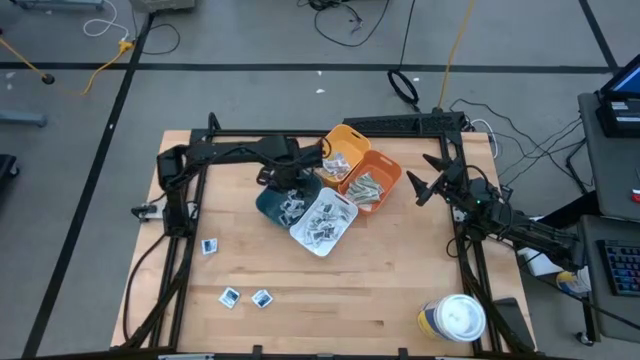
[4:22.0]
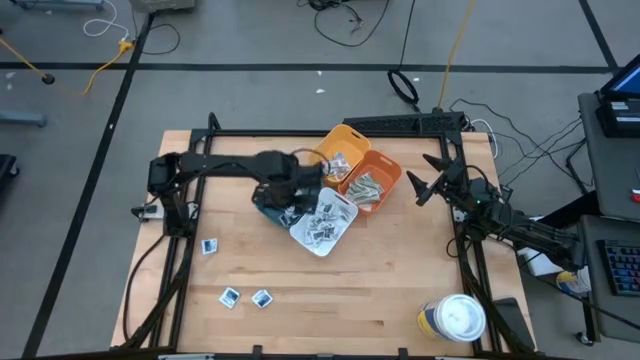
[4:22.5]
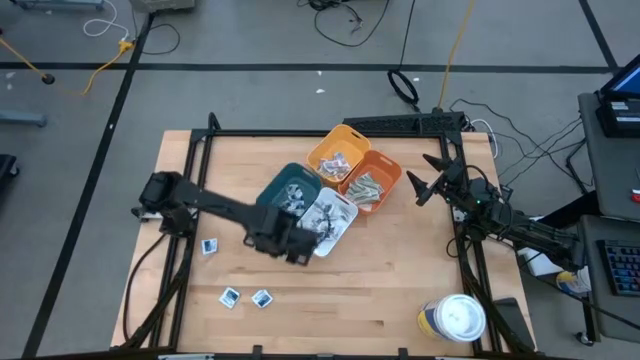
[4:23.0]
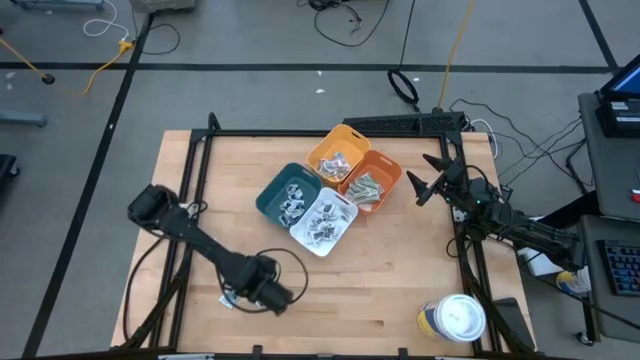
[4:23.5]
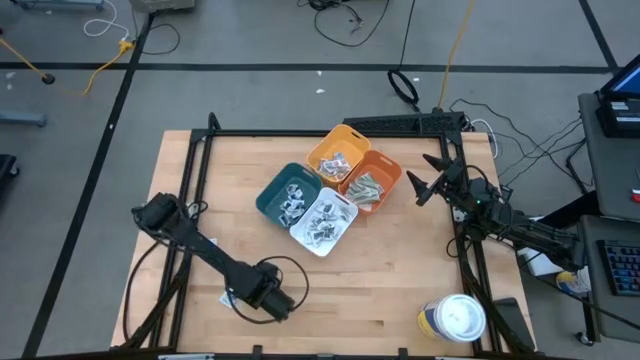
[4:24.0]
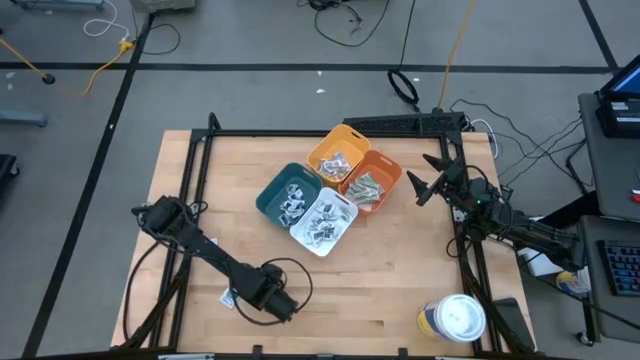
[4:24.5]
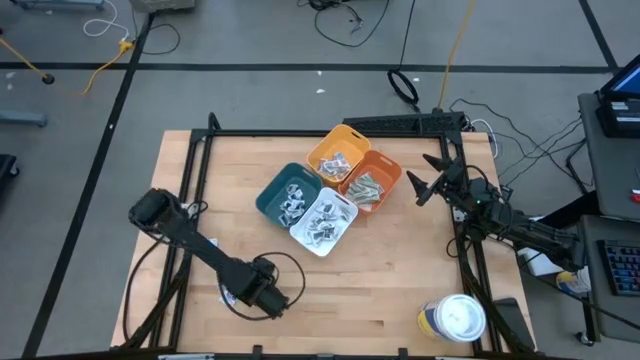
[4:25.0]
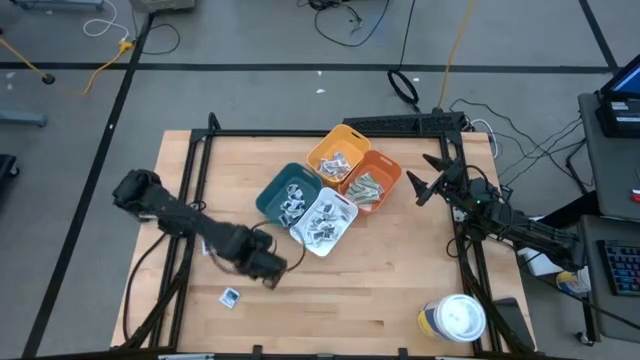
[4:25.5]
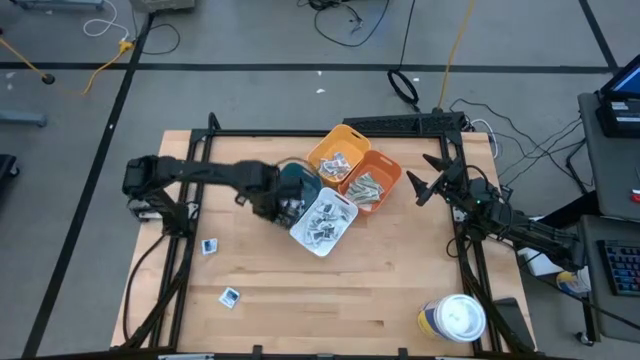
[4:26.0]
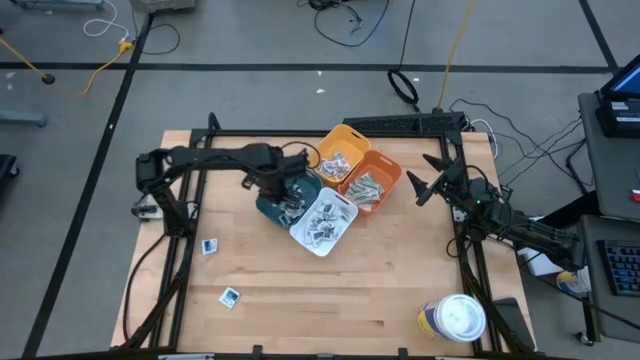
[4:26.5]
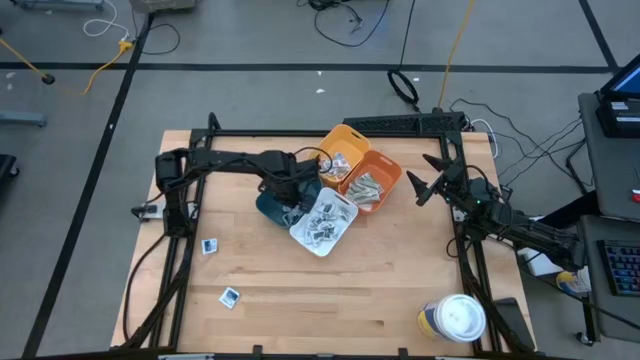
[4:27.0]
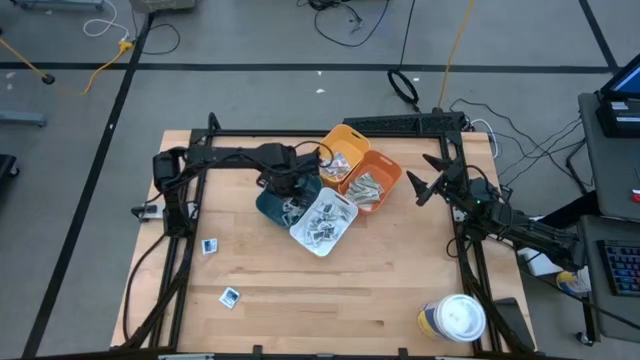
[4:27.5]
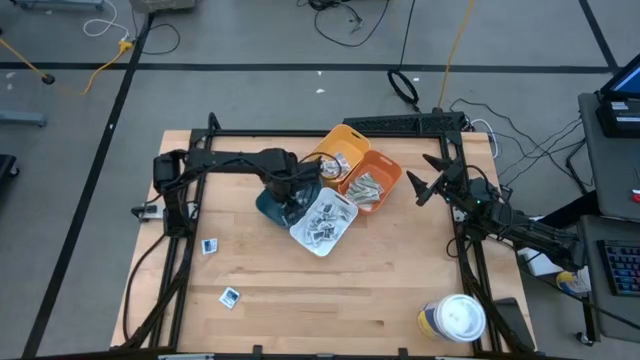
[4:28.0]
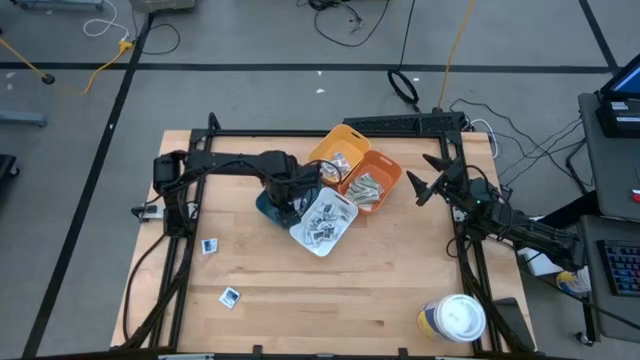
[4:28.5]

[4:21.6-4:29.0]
Task: Pick & Place First Aid Supplies
Put the blue alcohol pad into the blue bin

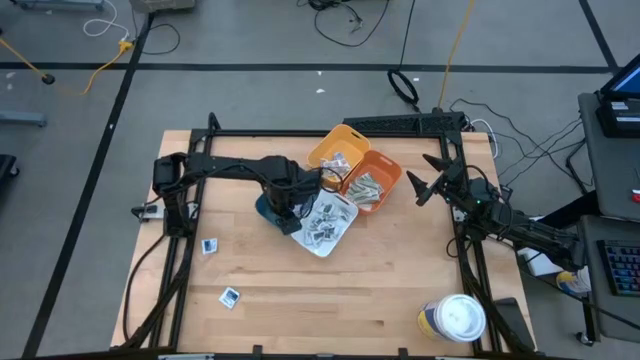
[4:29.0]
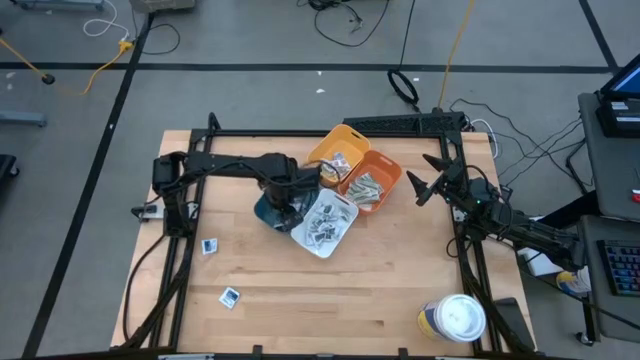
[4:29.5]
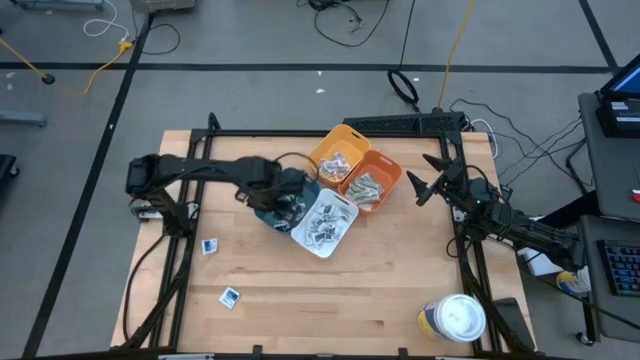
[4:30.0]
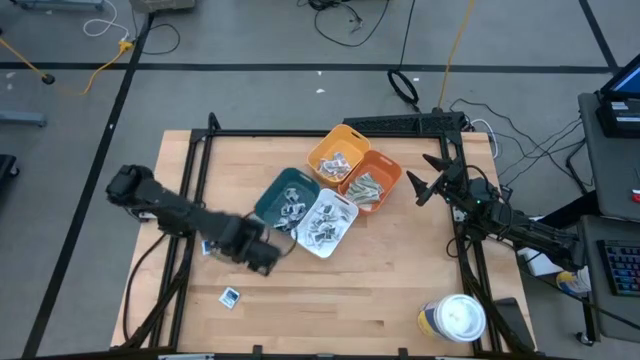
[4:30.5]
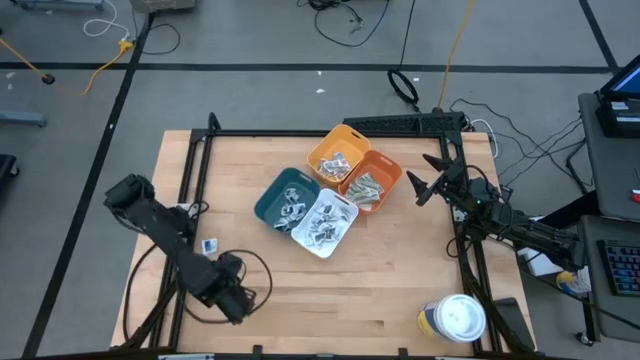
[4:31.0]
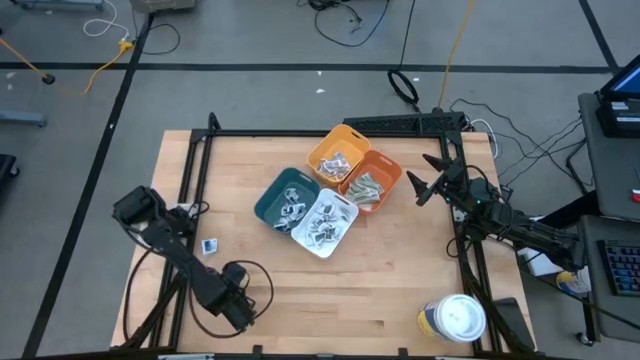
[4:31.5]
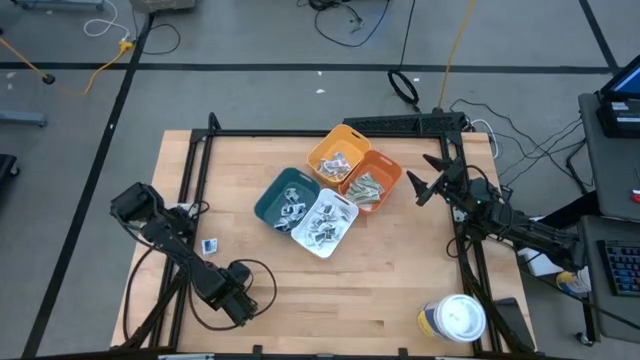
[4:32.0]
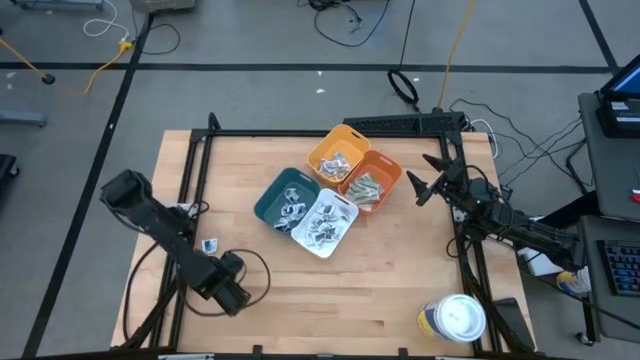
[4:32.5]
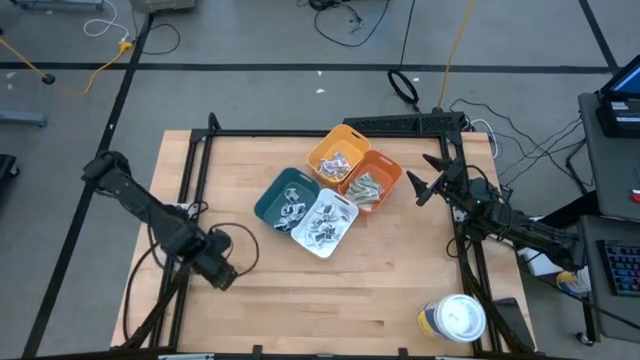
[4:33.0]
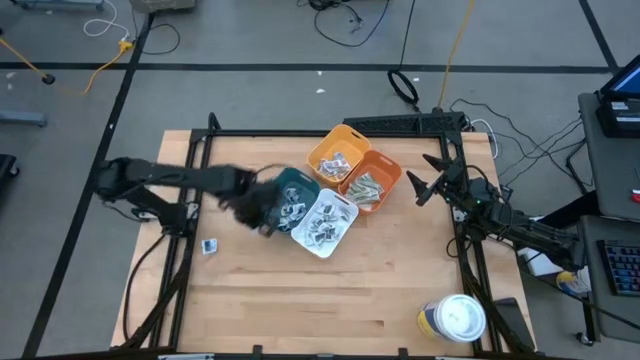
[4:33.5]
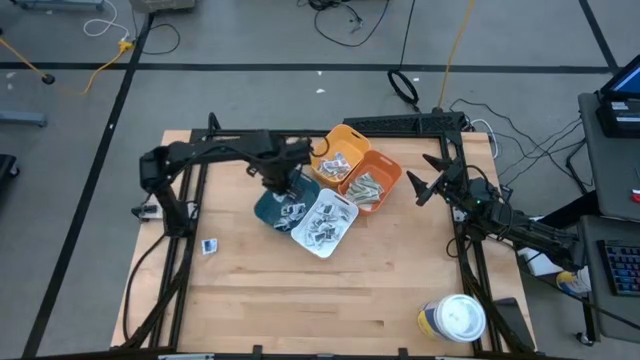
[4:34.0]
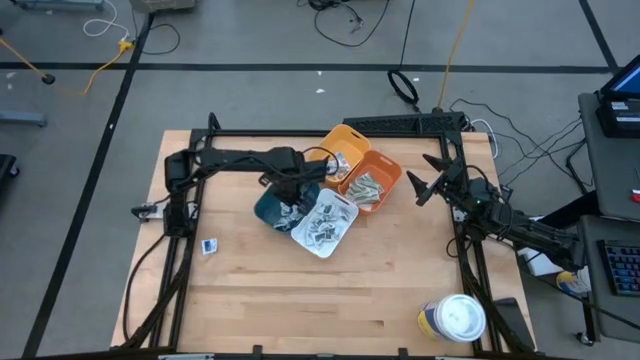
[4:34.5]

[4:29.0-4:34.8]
Put the blue alcohol pad into the blue bin

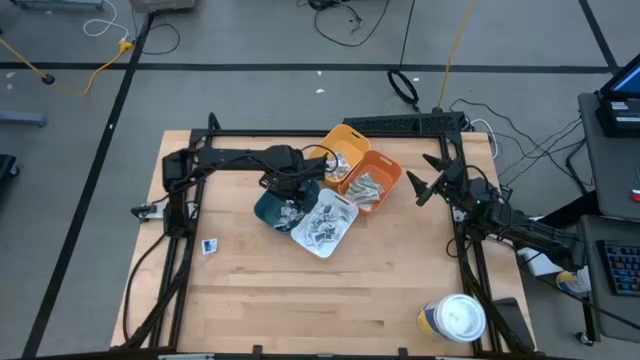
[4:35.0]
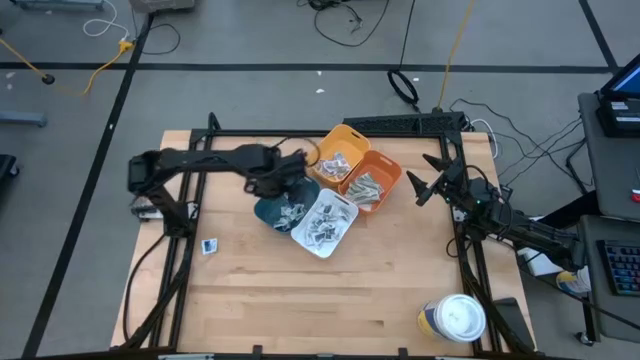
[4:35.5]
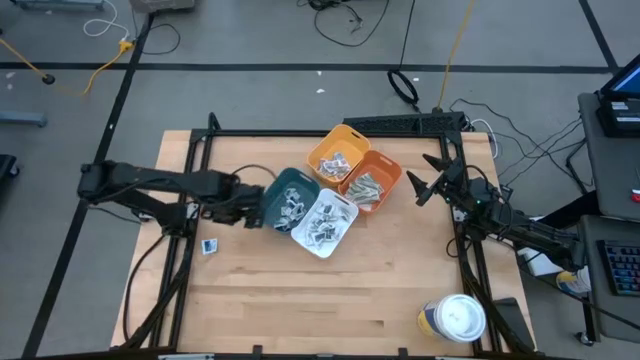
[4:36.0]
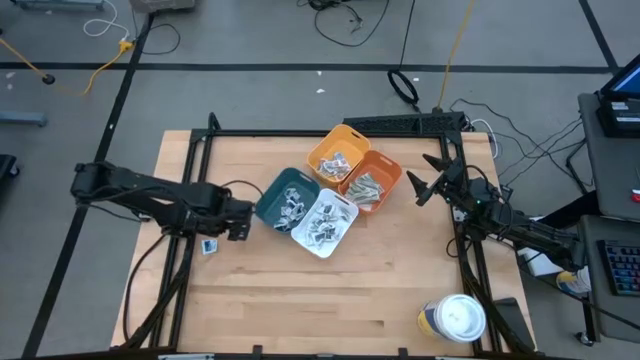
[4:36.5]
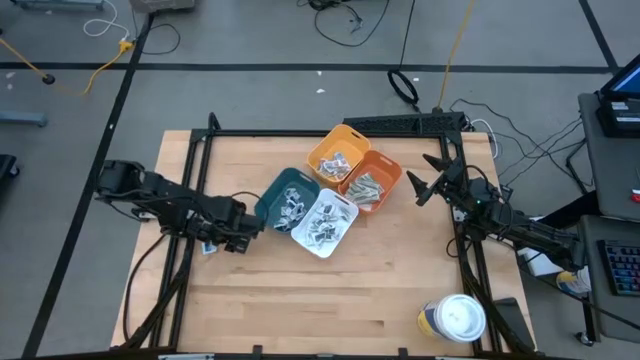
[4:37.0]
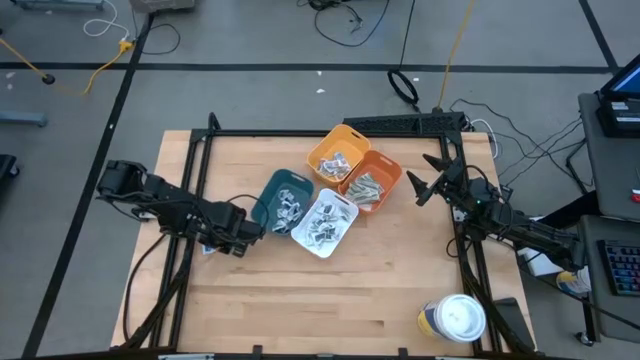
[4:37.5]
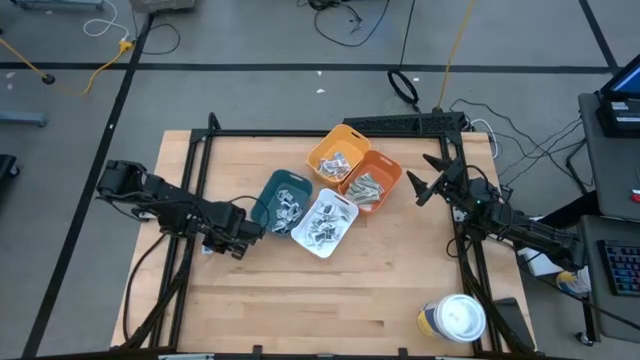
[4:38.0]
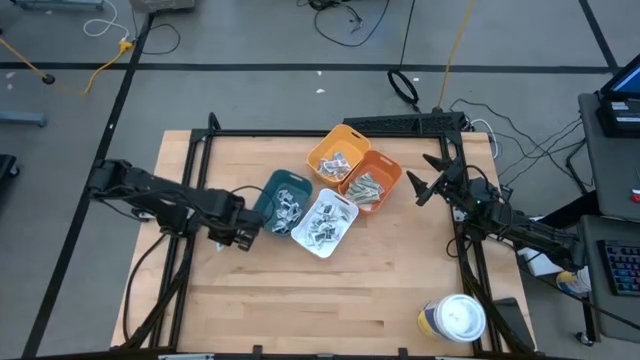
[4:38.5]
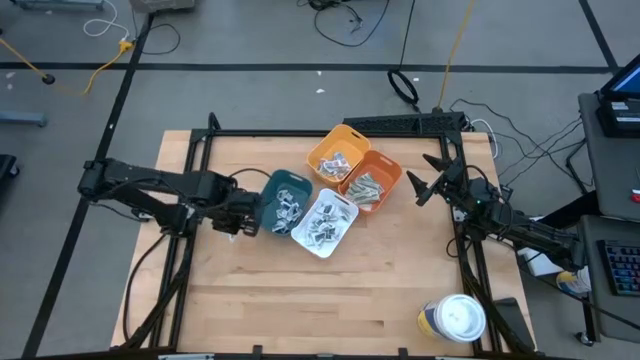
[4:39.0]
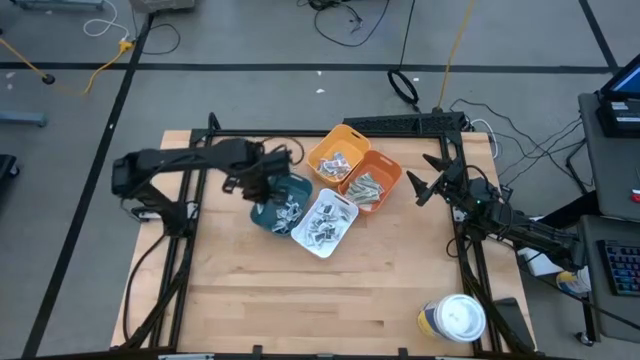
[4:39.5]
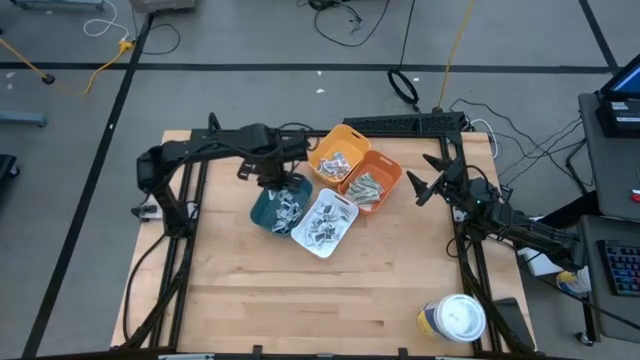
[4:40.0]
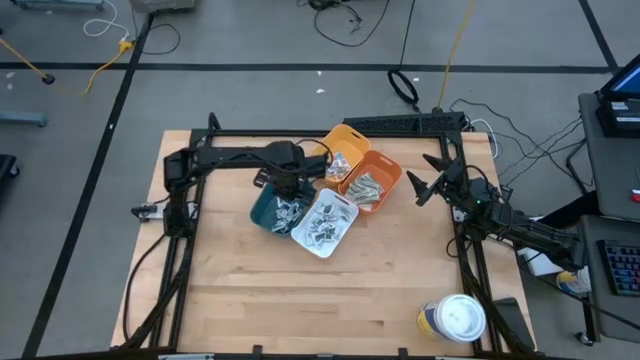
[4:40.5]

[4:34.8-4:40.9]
Put the blue alcohol pad into the blue bin

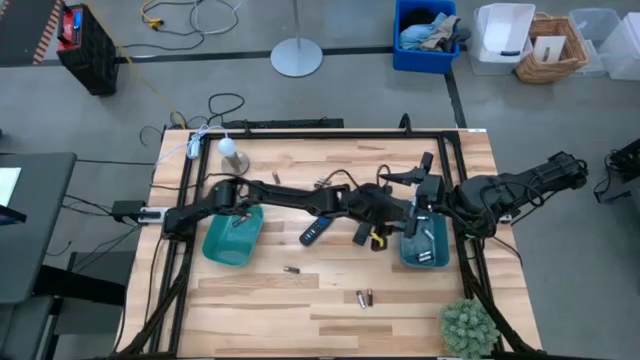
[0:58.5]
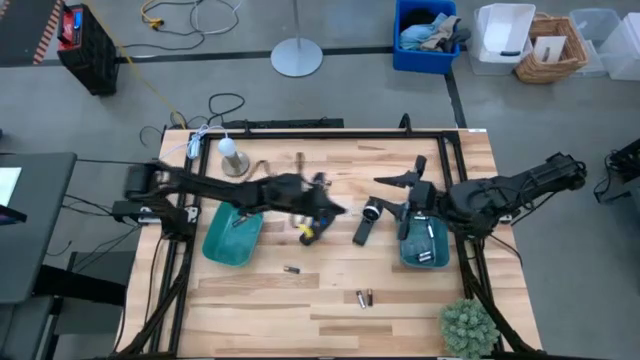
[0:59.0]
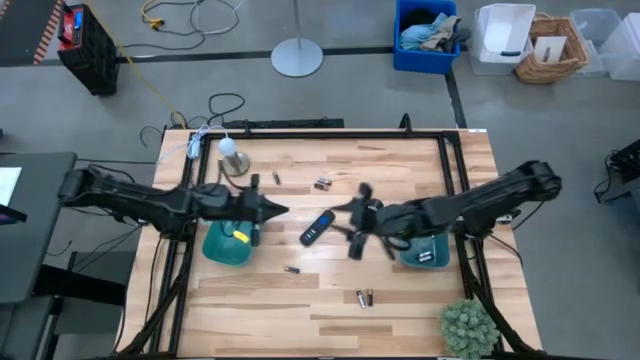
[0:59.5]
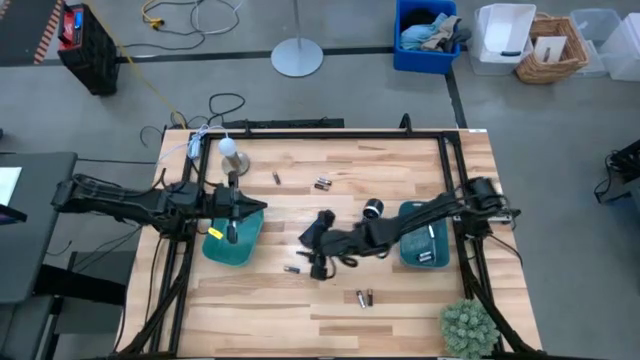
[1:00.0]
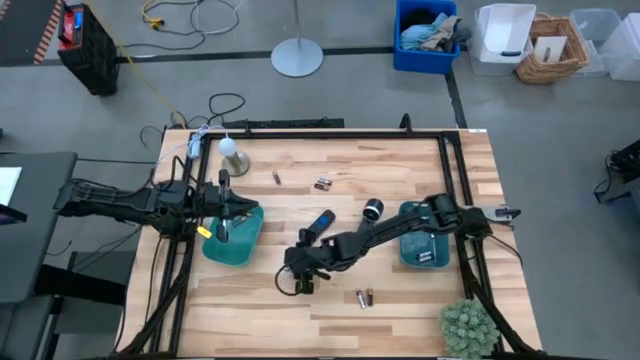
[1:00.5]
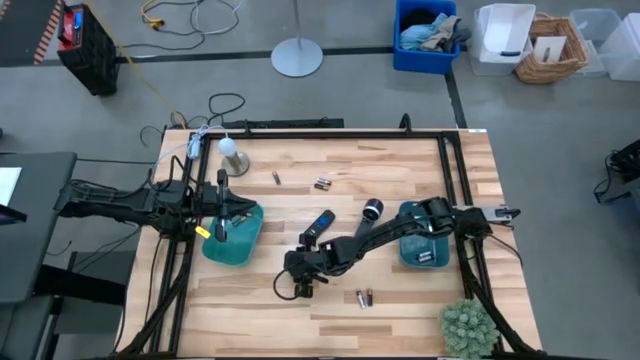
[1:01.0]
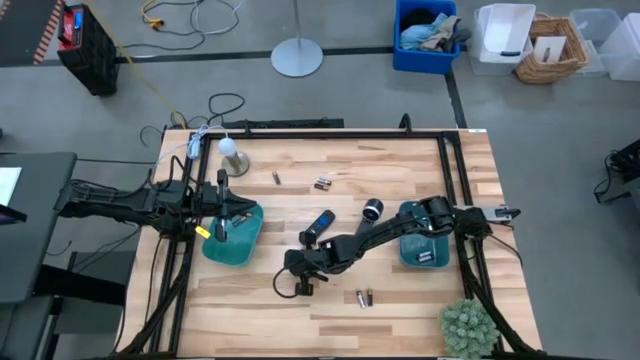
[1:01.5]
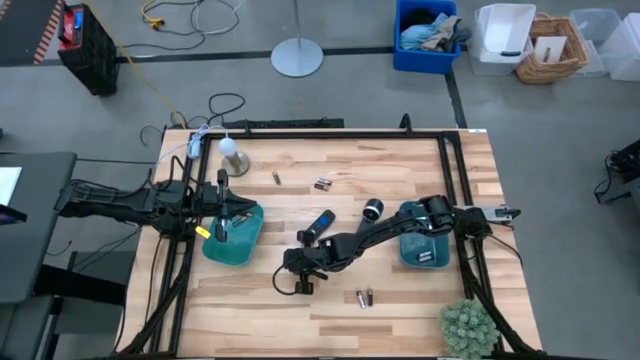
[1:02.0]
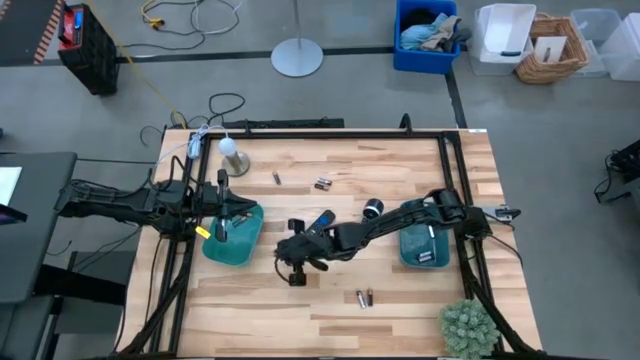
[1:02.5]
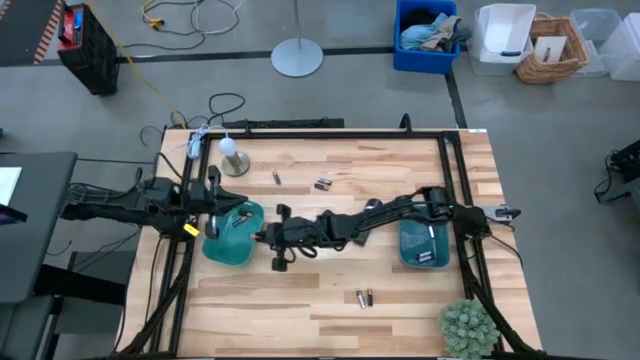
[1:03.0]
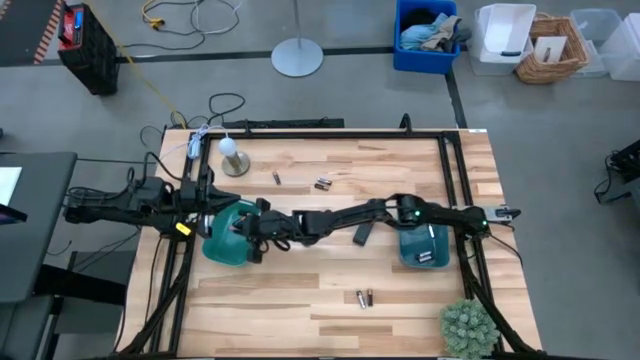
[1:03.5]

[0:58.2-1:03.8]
Task: Sort batteries
Put the brown battery into the green bin
